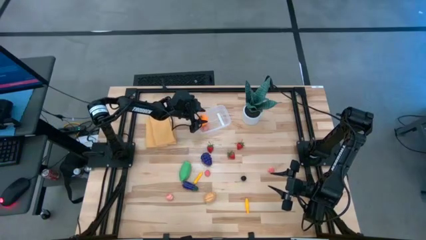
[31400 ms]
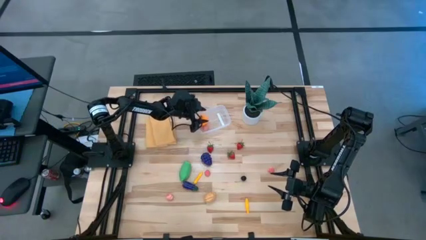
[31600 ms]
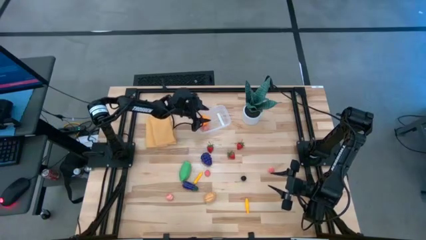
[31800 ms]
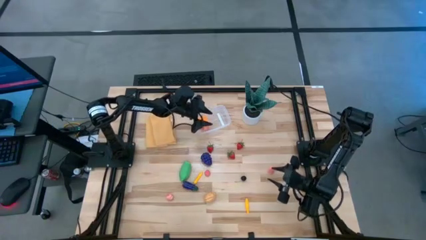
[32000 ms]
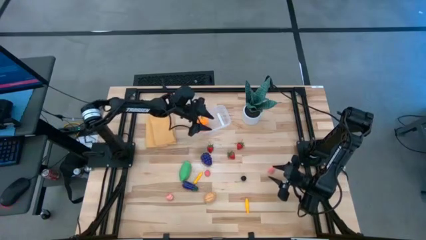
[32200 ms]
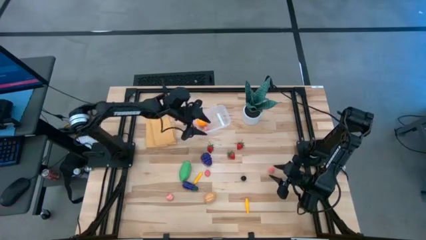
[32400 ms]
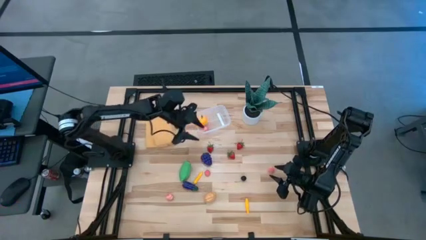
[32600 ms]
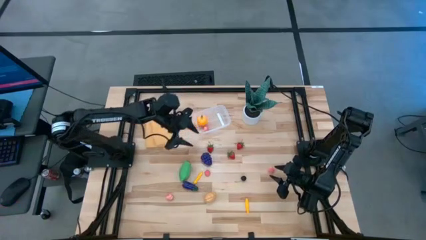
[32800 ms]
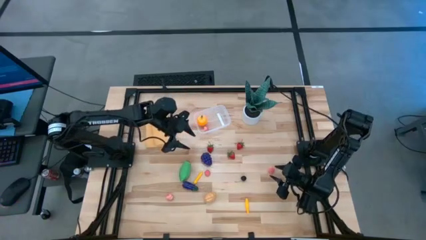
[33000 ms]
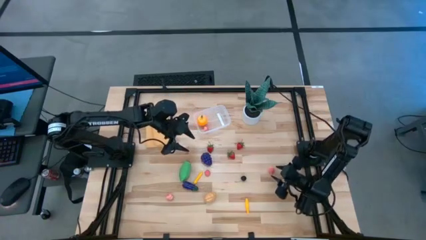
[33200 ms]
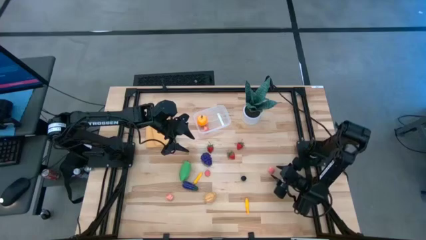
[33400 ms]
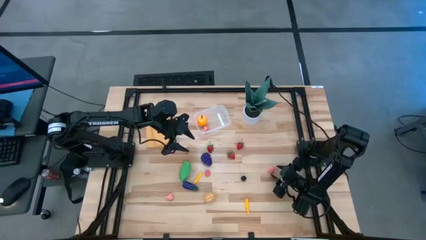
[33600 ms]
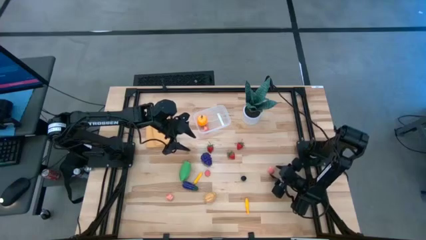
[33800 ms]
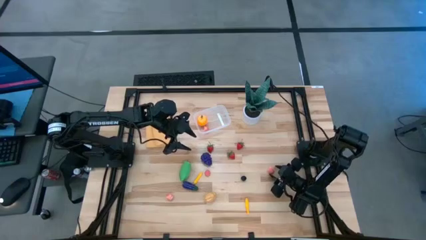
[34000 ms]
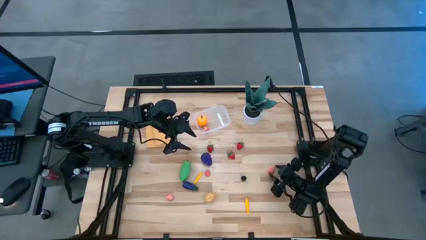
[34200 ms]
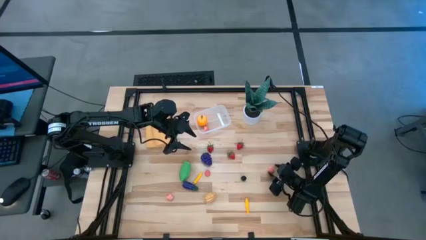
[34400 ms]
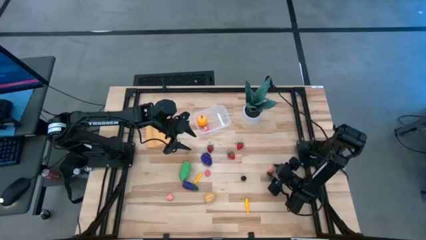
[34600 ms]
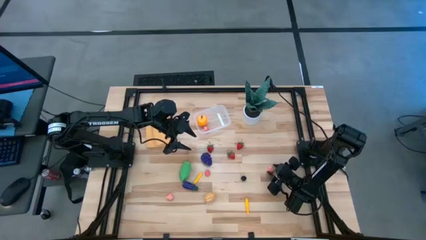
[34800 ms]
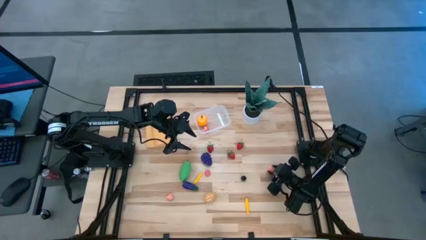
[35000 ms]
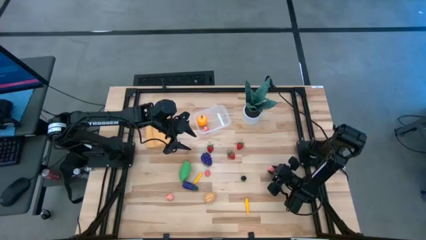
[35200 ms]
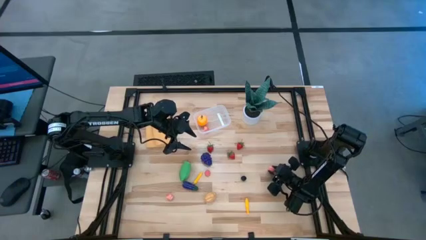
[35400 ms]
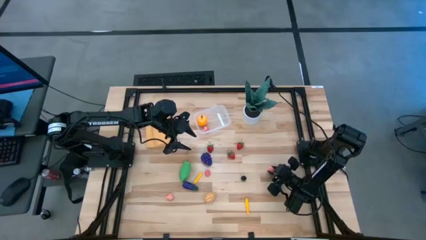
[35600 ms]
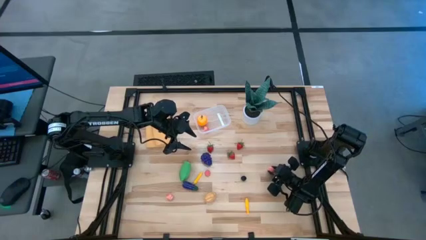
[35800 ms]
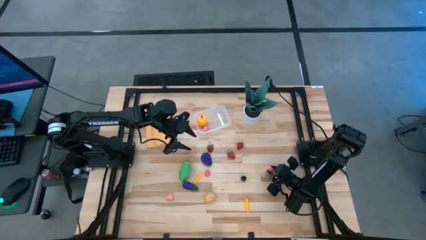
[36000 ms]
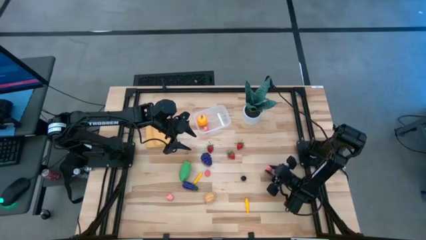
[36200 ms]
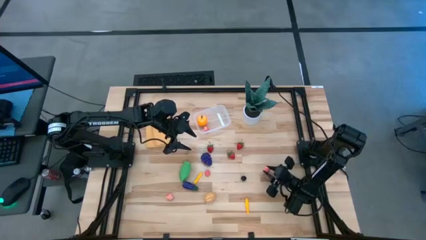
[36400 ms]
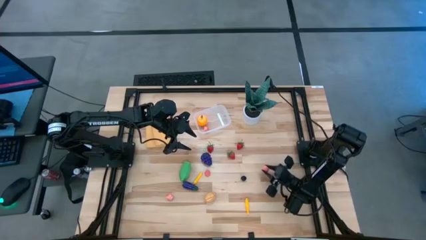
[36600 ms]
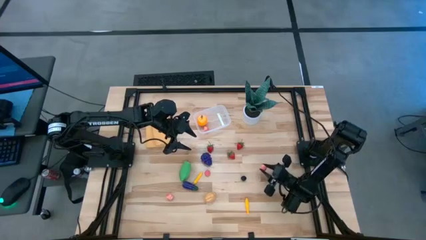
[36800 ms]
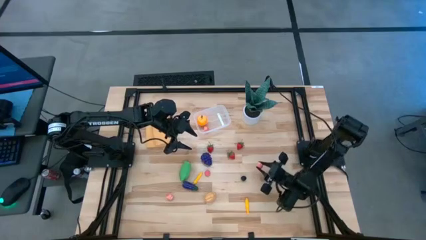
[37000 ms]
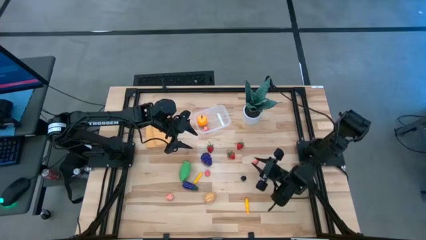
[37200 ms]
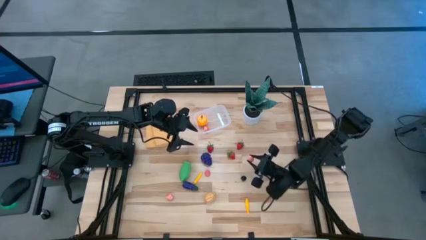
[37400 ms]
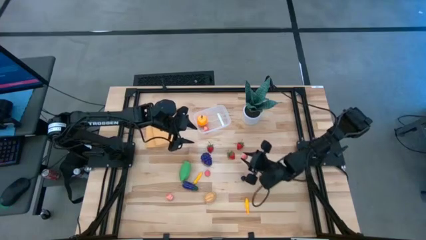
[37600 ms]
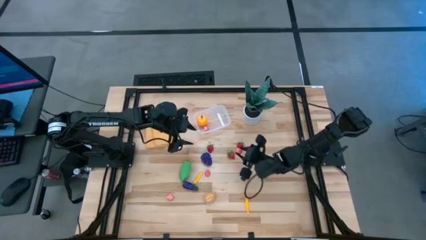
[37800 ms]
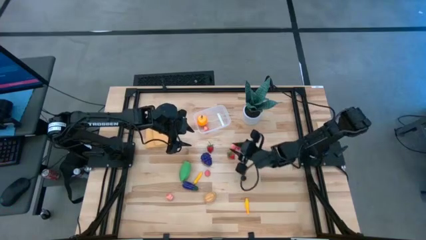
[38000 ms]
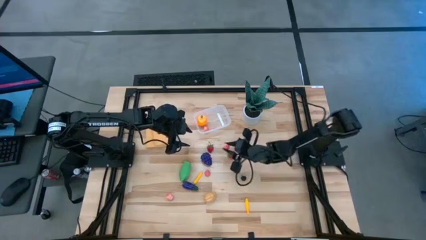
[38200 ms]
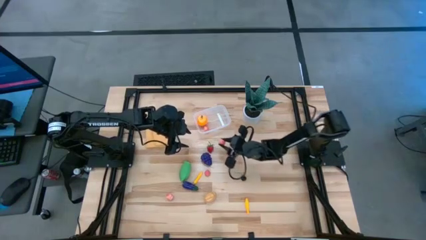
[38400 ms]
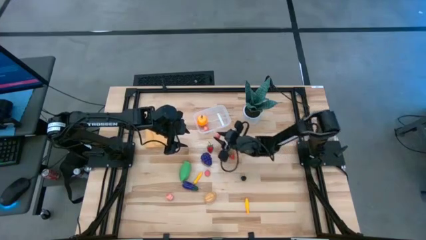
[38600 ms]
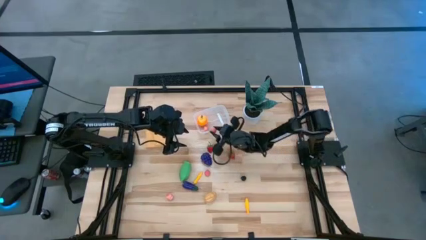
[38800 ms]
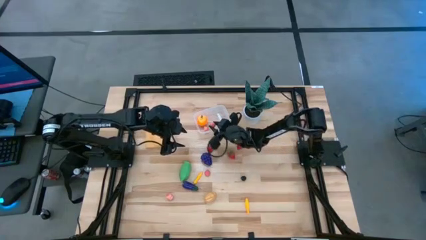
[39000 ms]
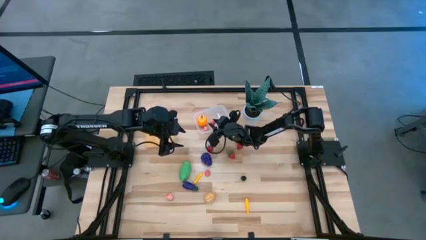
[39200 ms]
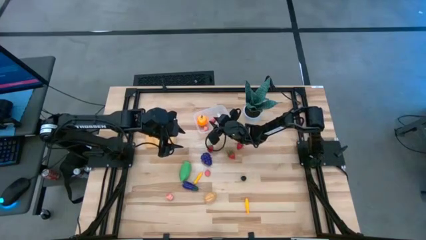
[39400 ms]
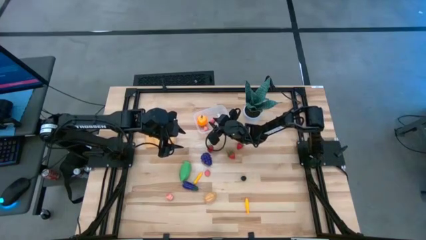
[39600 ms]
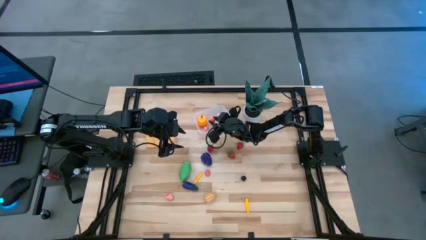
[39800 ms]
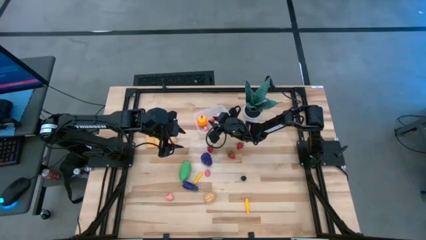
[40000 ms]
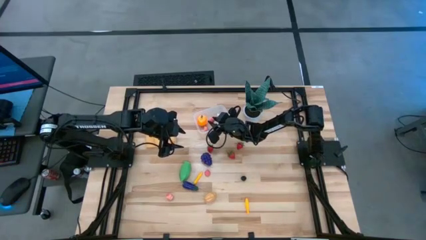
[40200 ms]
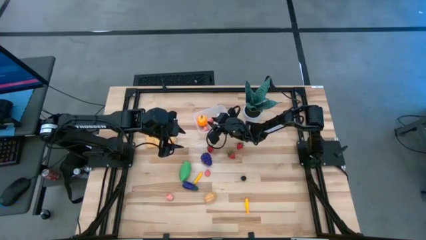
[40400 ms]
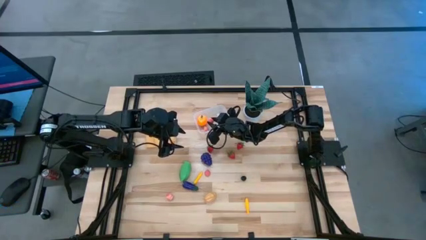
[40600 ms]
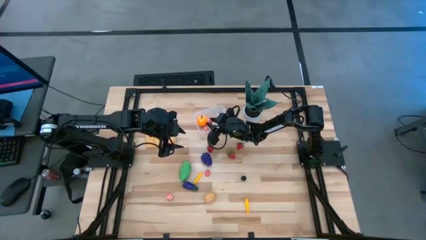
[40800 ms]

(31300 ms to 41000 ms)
Task: Pick and placing Produce into tupperware
Put the pink peach into the transparent bin

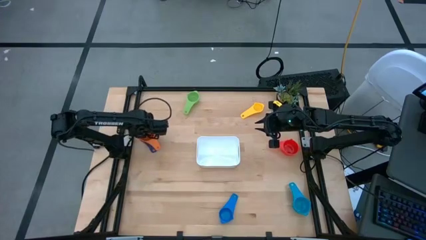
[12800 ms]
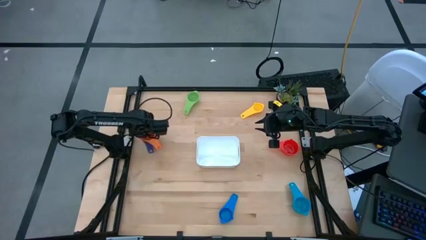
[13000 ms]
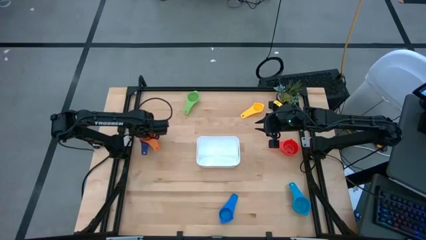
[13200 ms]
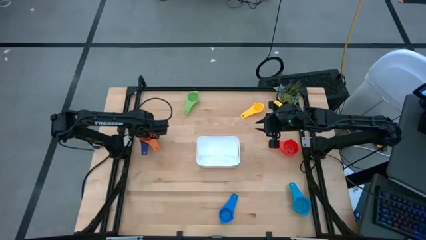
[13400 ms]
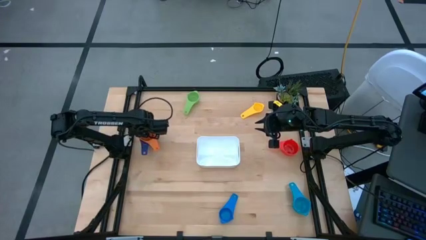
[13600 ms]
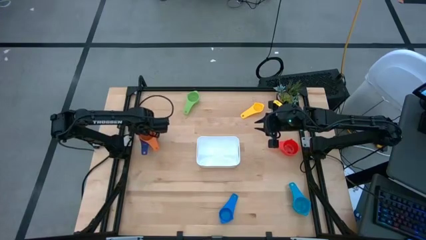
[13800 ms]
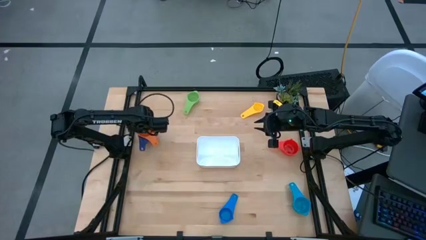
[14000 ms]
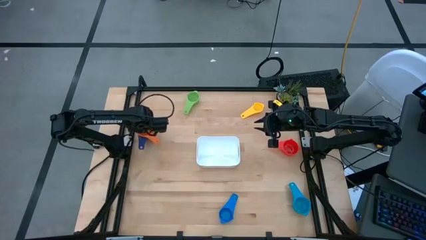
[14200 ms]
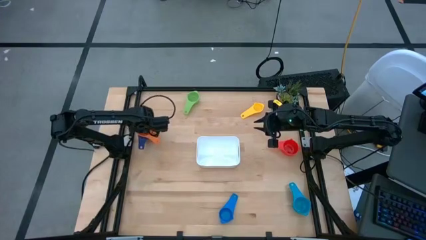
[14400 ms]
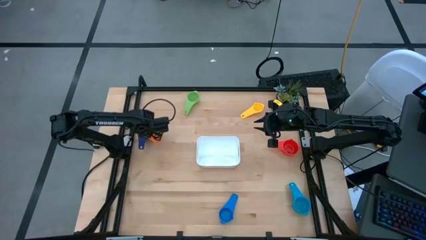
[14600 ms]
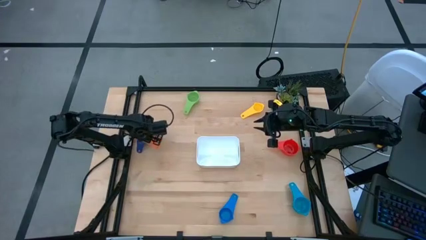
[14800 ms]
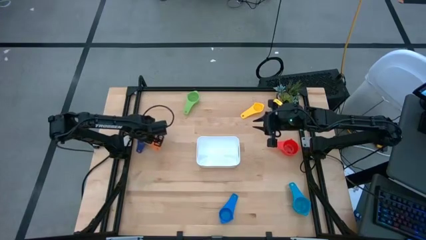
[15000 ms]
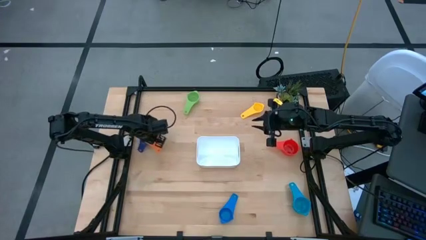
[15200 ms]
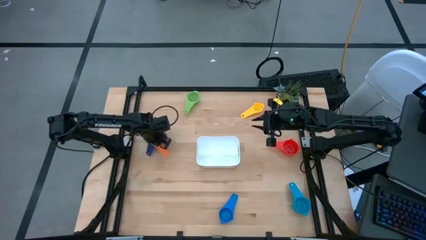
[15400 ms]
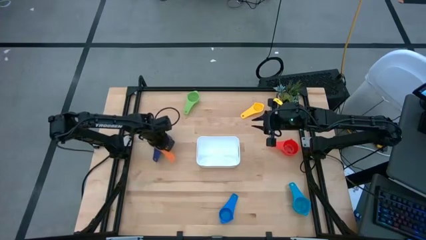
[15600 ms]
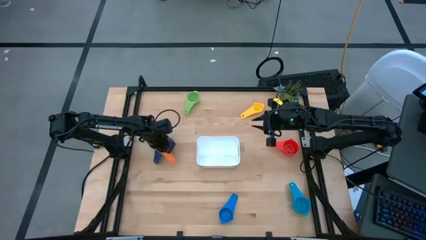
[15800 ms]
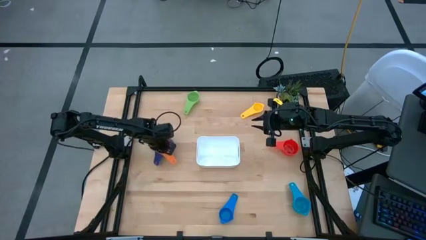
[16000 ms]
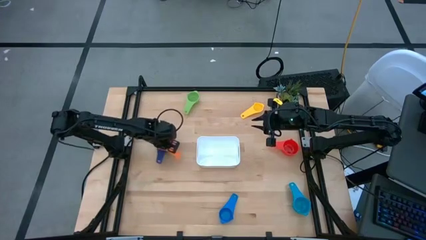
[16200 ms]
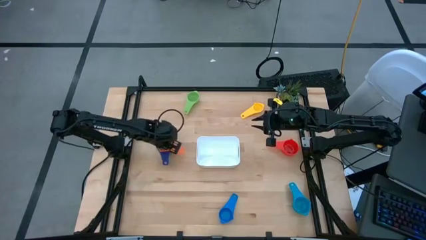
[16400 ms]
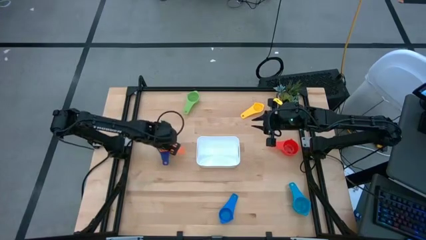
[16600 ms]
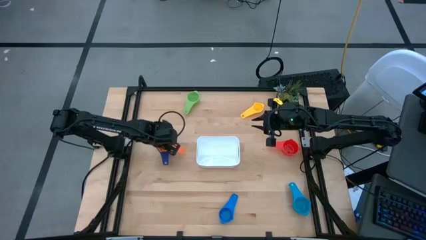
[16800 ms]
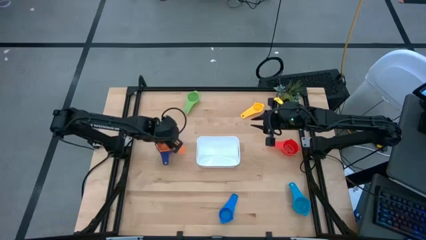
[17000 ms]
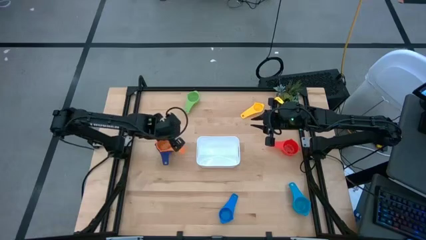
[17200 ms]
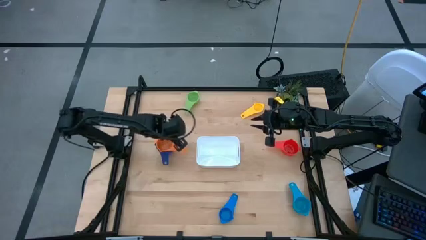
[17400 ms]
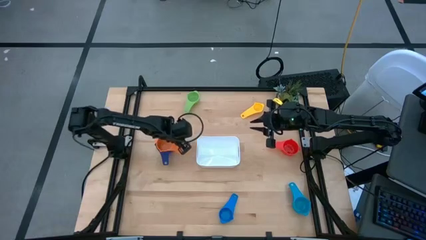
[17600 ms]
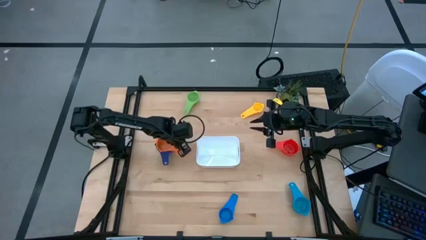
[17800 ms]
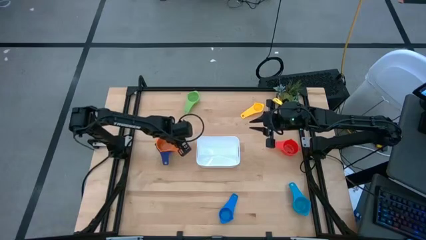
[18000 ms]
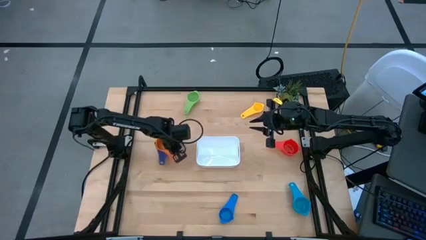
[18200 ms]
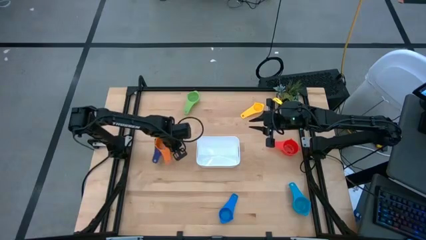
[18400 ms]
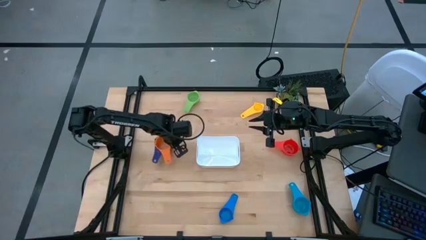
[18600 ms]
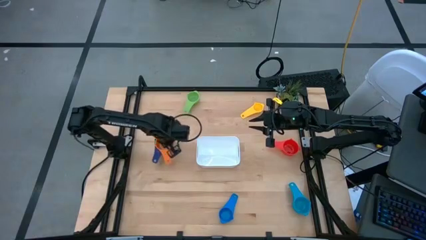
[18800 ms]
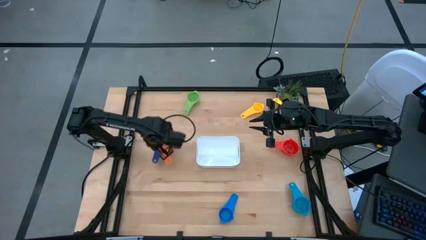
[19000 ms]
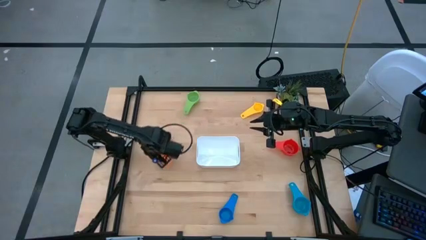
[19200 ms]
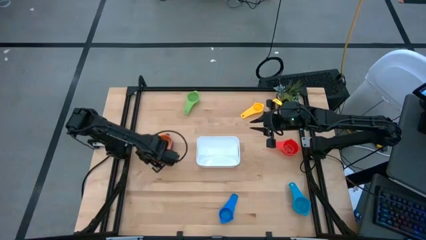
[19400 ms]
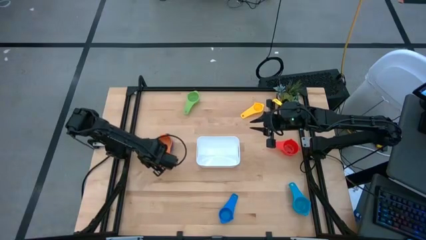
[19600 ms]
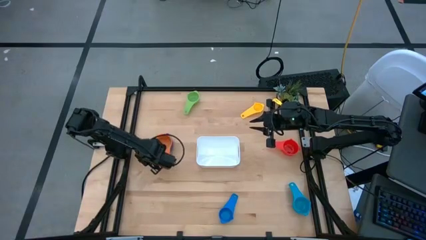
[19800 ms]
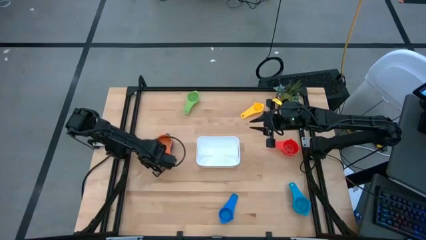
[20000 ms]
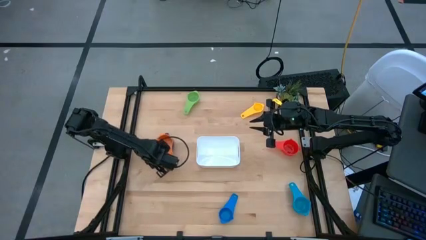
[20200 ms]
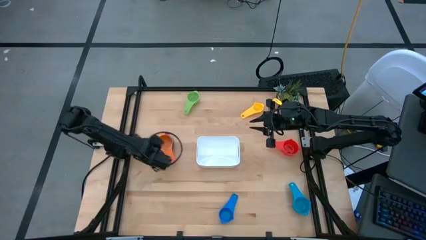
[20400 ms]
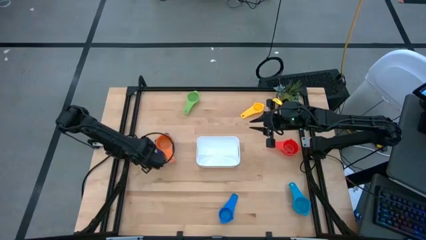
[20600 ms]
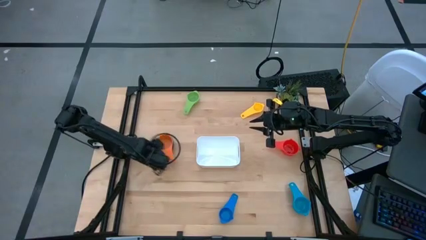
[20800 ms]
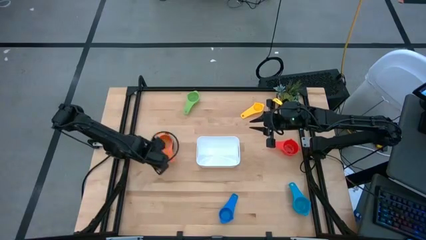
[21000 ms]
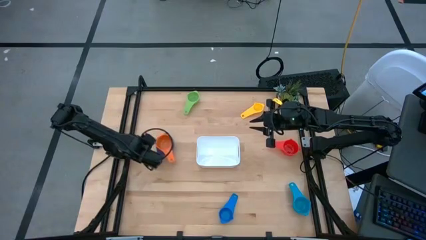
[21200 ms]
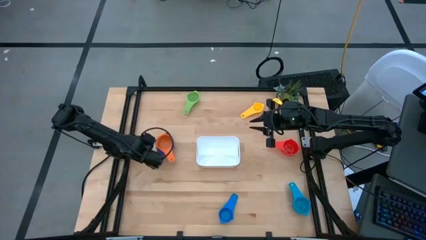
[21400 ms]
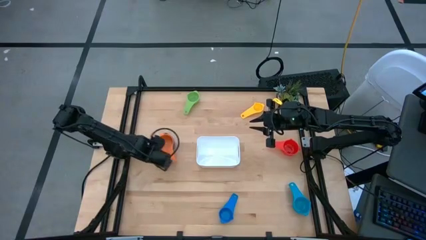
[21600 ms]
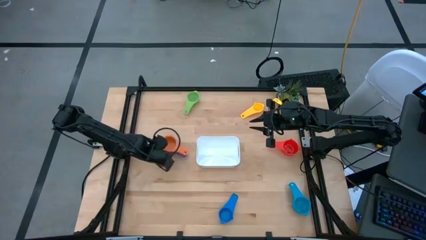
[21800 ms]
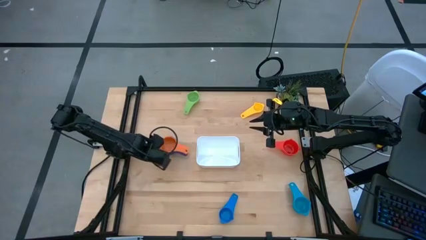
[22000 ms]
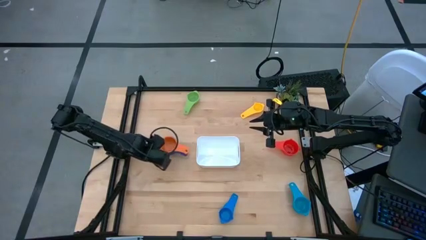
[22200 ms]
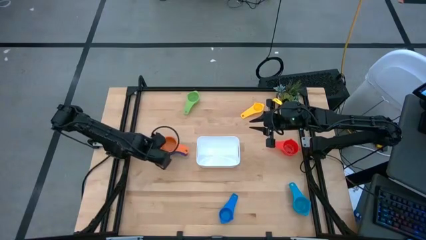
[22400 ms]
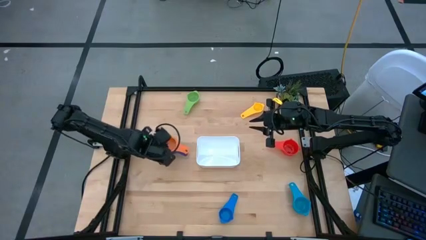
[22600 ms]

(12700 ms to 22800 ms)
Task: Nest measuring cups in basket
Stack the orange measuring cup on top of the blue measuring cup
